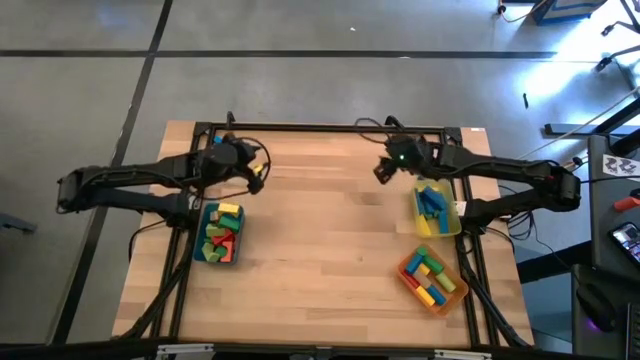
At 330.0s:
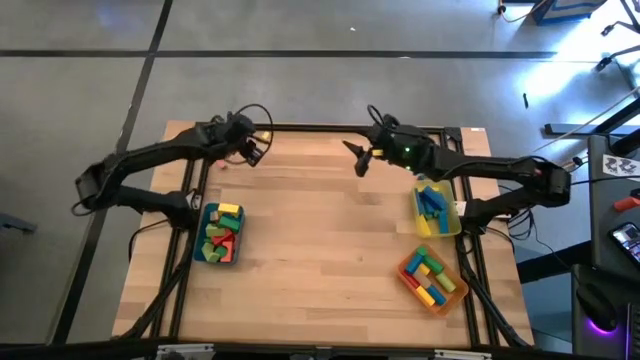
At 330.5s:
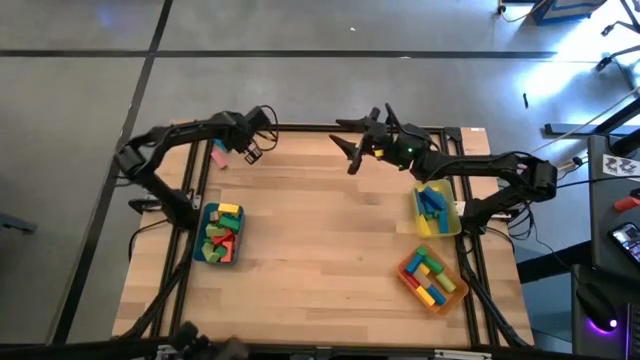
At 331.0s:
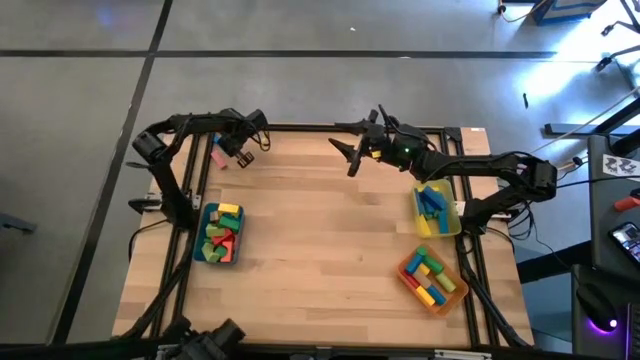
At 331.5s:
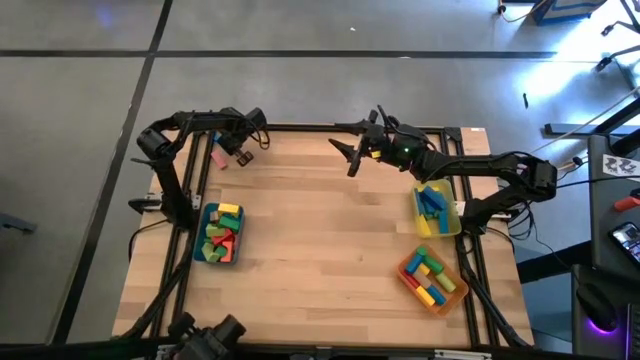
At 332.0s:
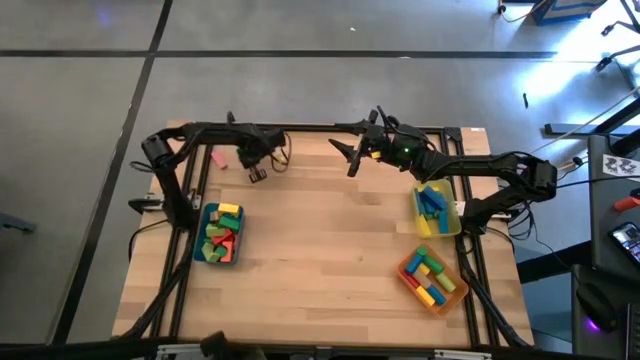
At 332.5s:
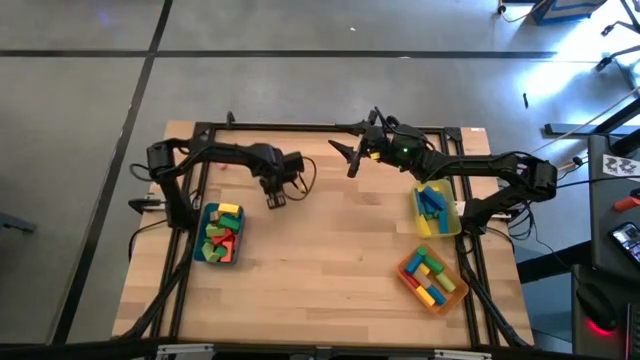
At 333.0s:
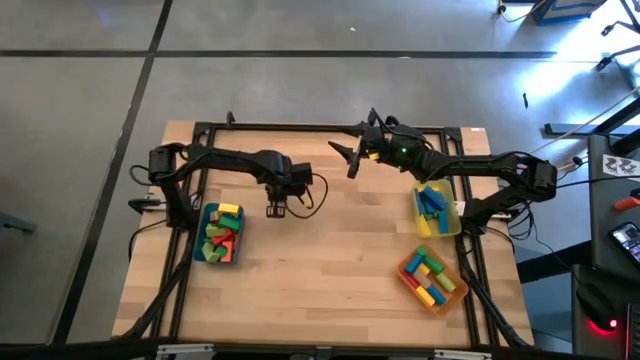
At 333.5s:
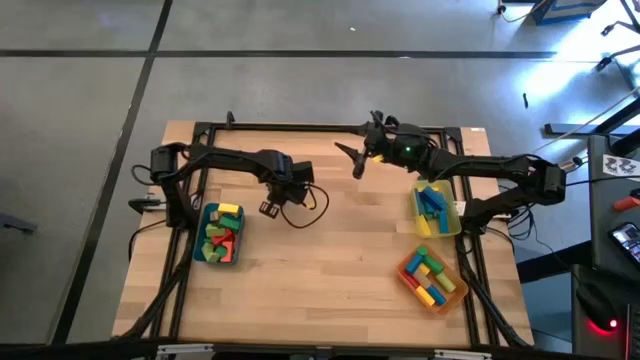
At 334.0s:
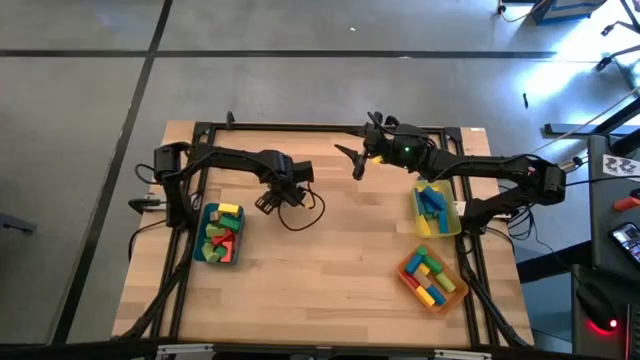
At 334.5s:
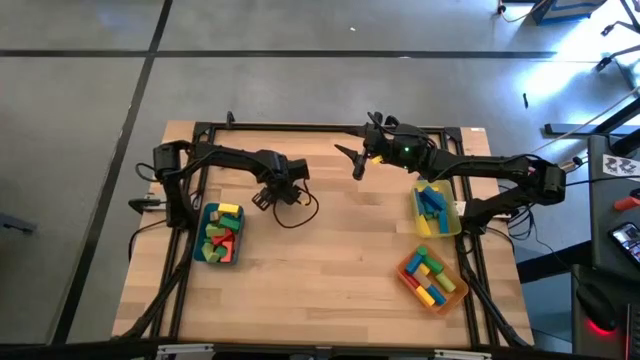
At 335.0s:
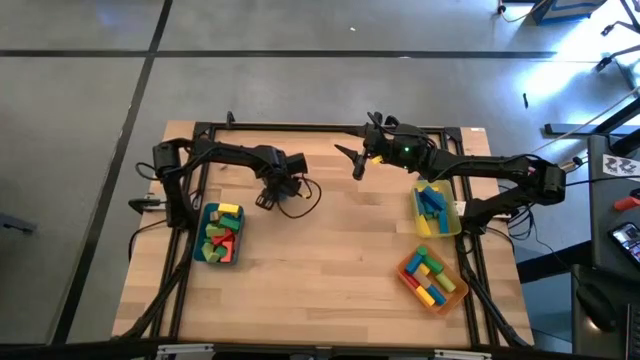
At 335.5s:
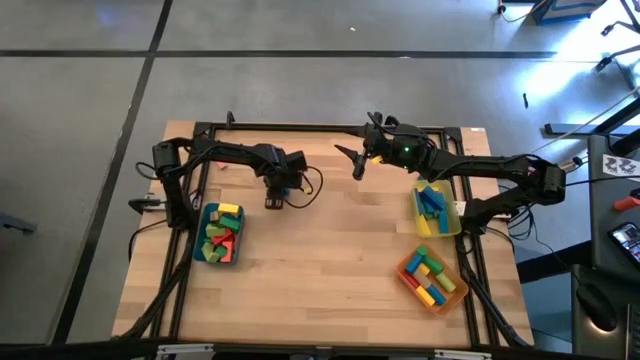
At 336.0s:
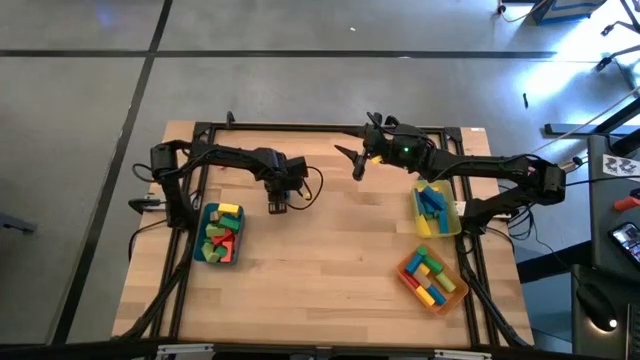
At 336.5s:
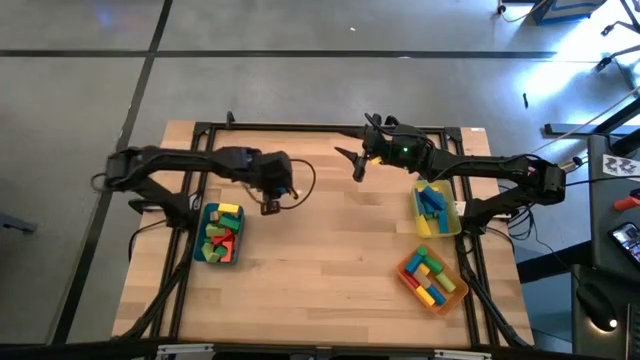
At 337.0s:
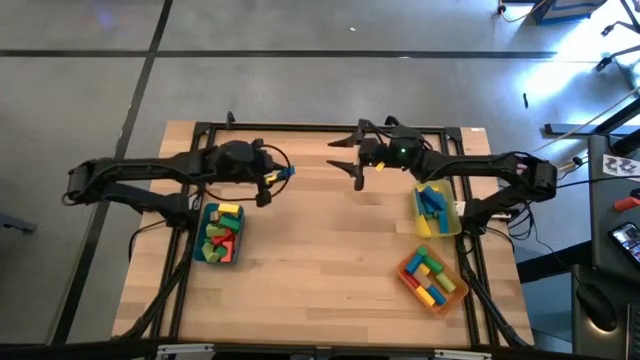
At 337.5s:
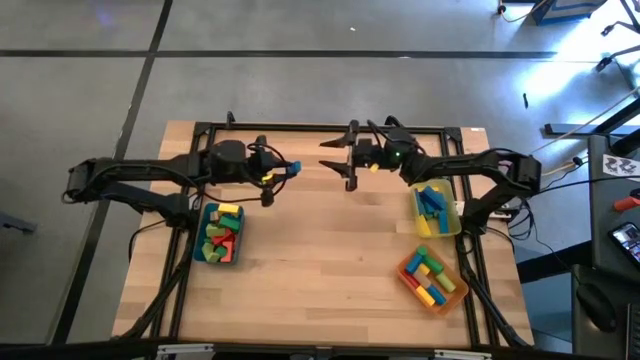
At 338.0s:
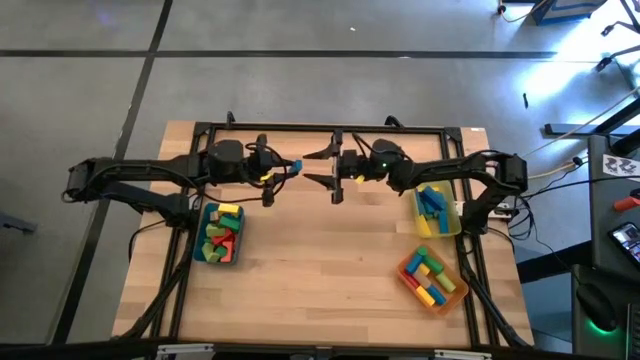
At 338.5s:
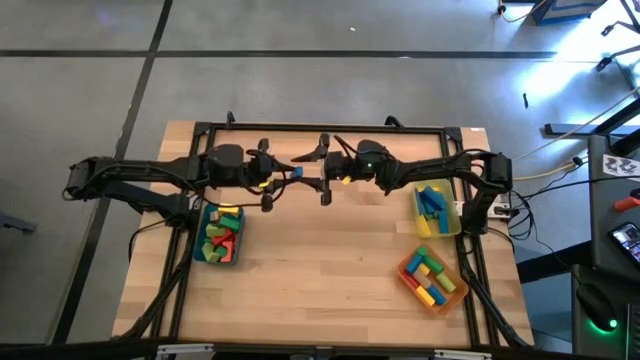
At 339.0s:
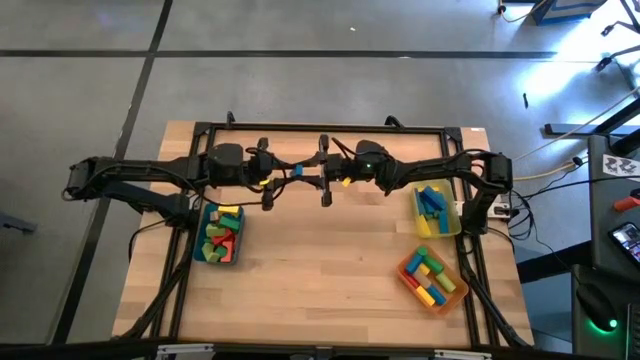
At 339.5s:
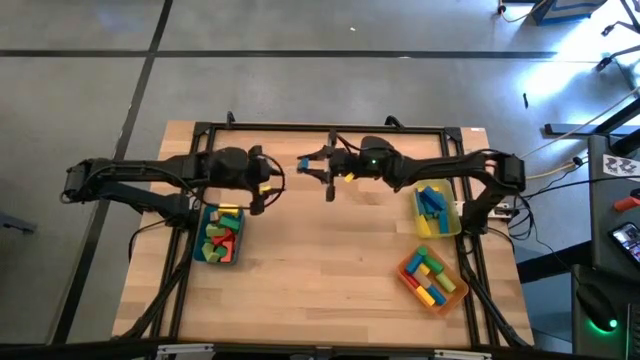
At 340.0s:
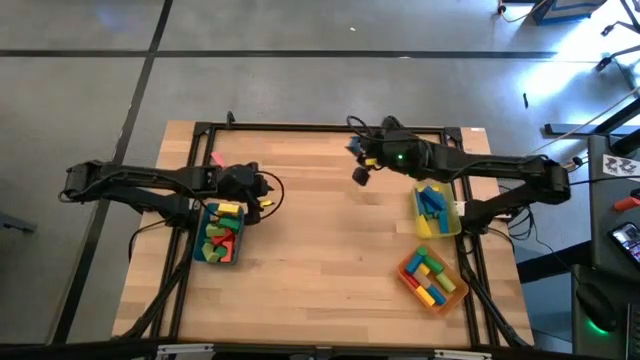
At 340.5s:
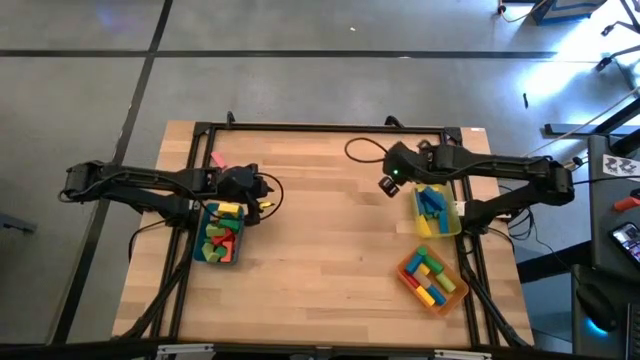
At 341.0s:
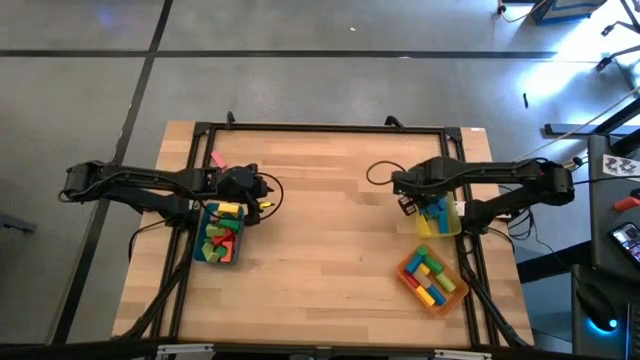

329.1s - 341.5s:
Task: Sort blocks by size
Put the blue rectangular block into the yellow bin

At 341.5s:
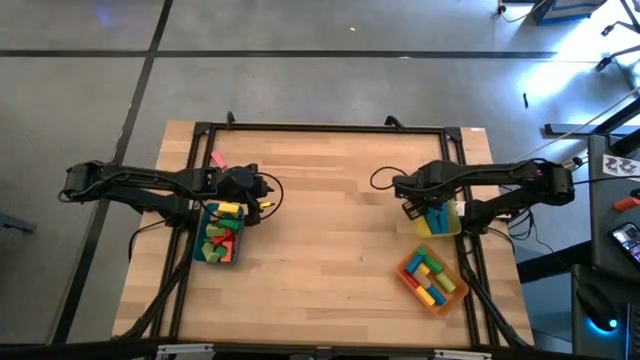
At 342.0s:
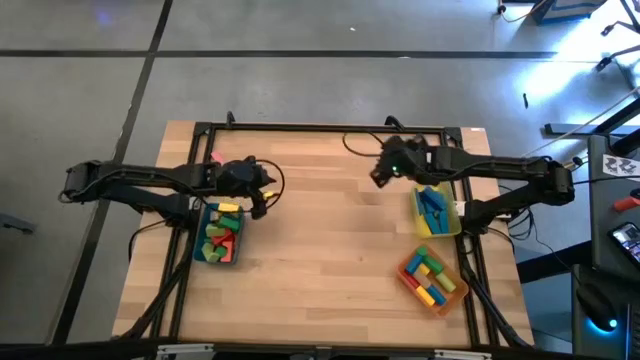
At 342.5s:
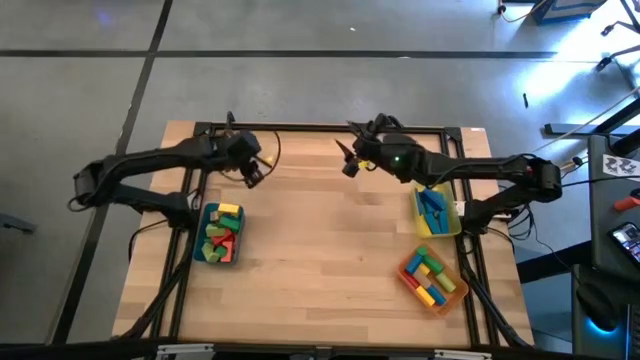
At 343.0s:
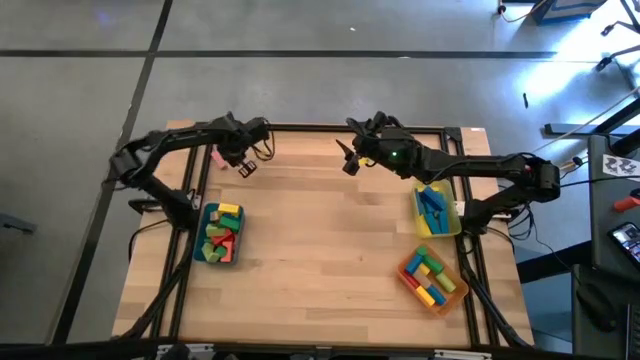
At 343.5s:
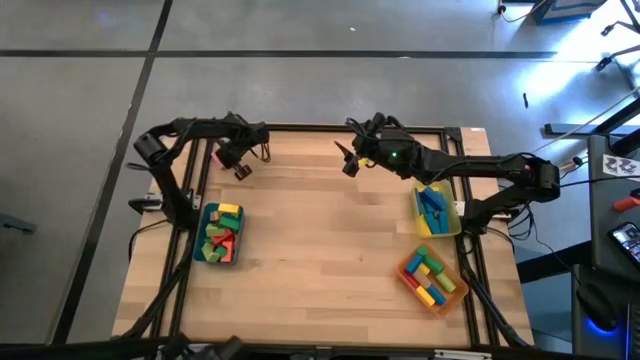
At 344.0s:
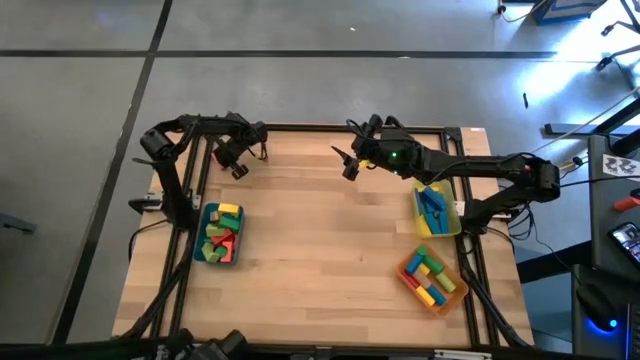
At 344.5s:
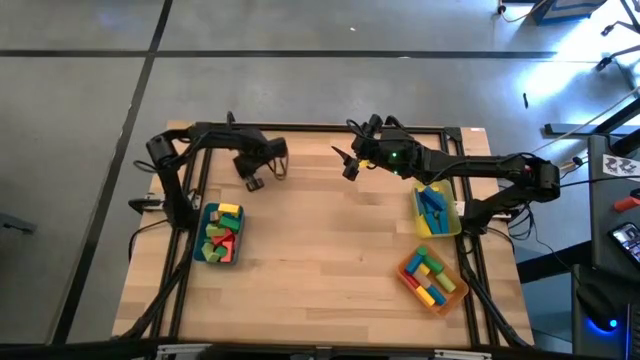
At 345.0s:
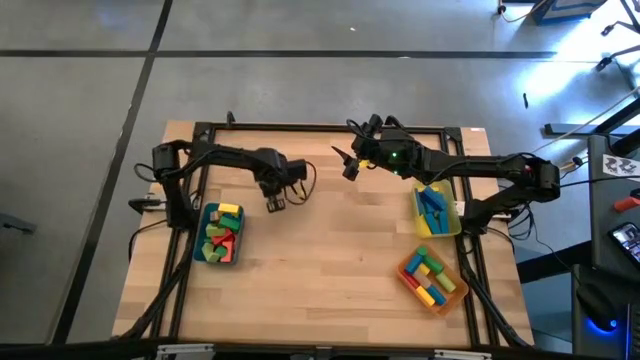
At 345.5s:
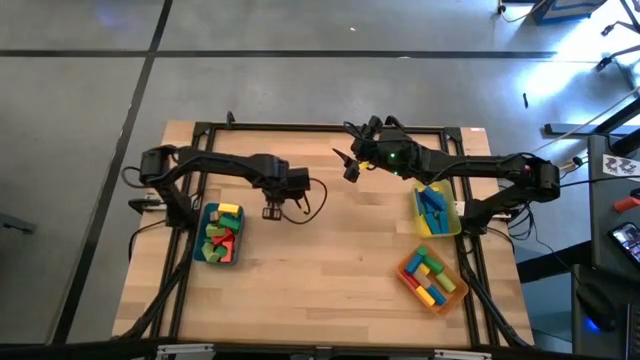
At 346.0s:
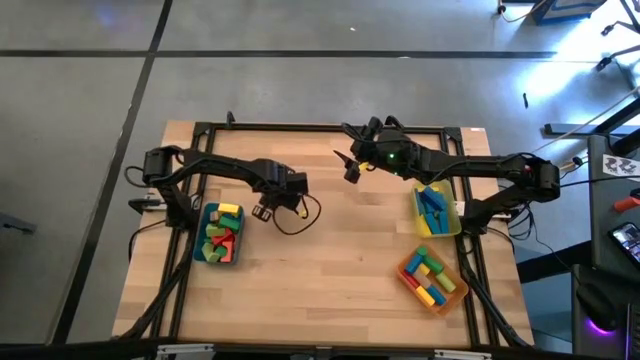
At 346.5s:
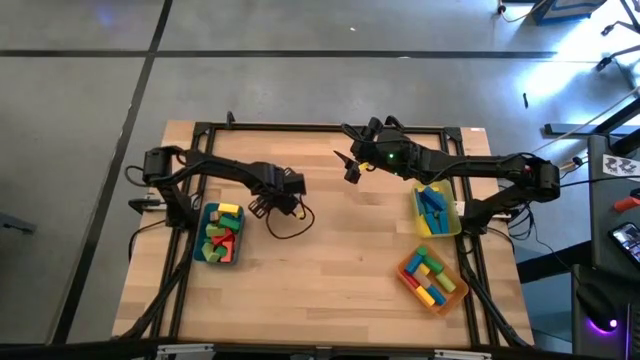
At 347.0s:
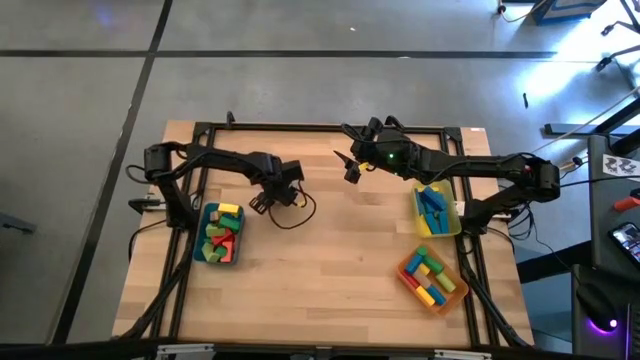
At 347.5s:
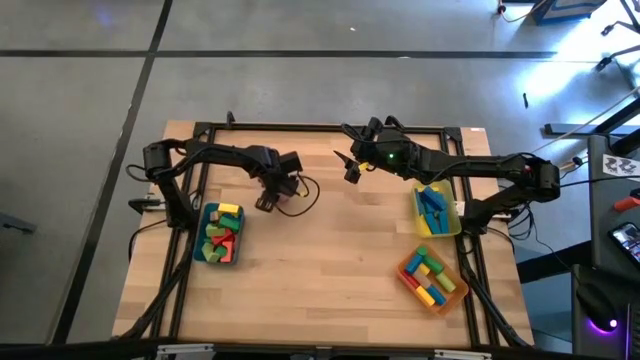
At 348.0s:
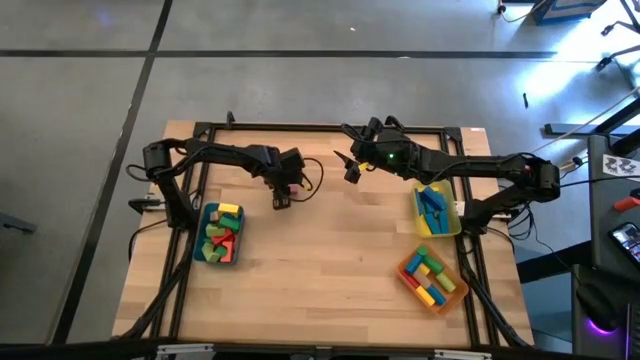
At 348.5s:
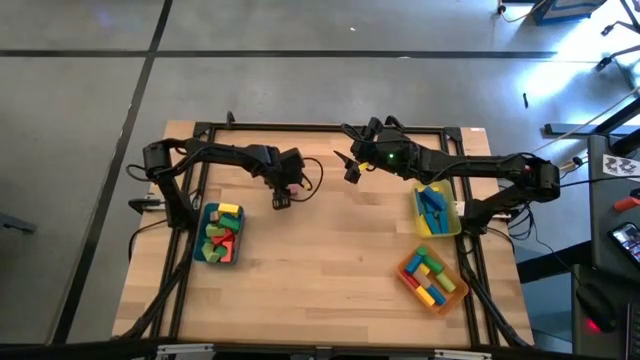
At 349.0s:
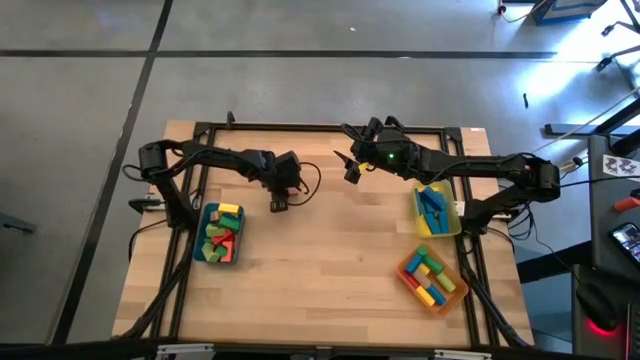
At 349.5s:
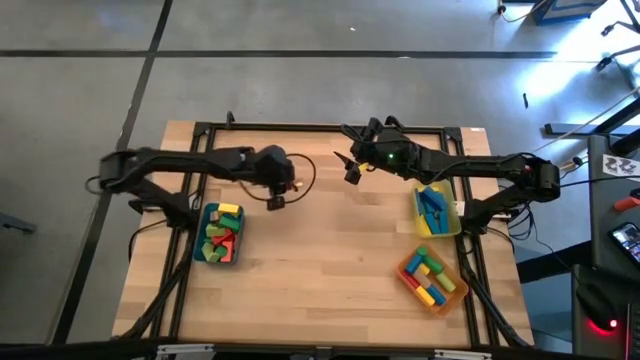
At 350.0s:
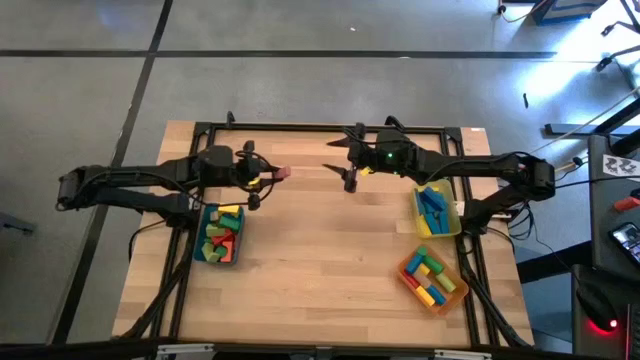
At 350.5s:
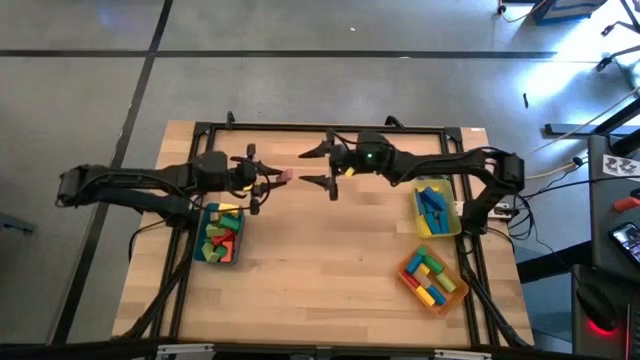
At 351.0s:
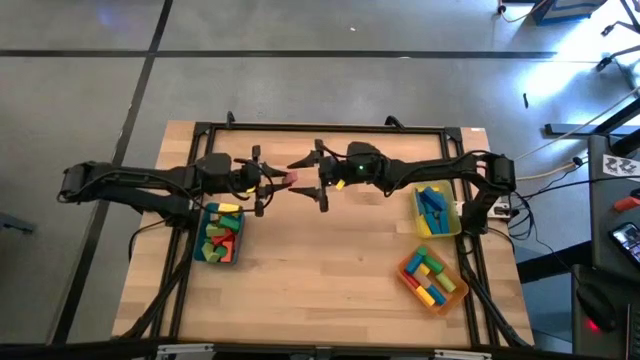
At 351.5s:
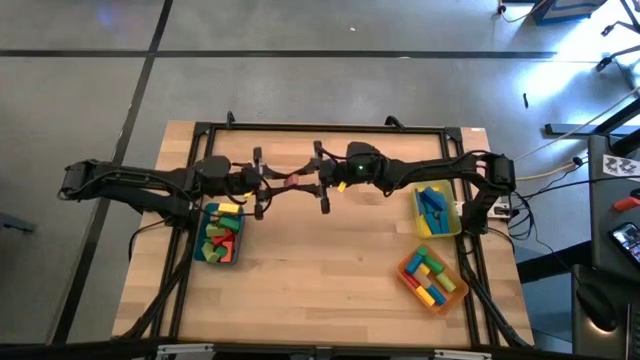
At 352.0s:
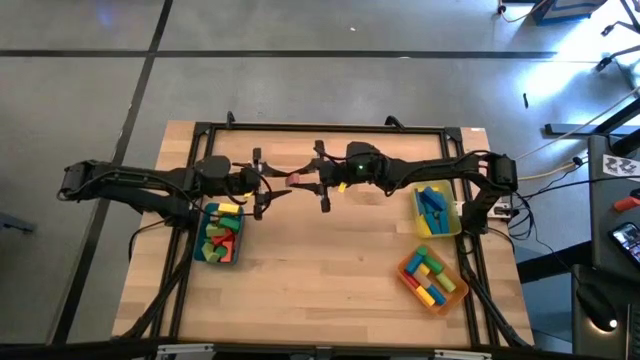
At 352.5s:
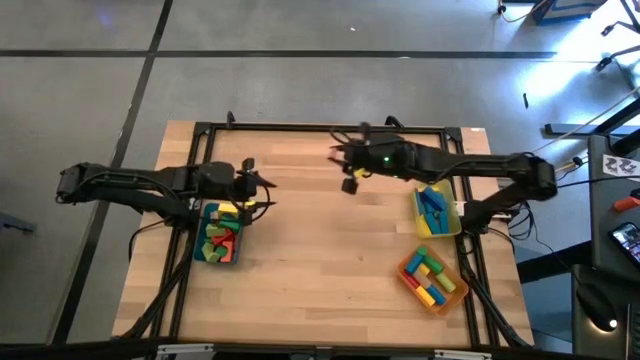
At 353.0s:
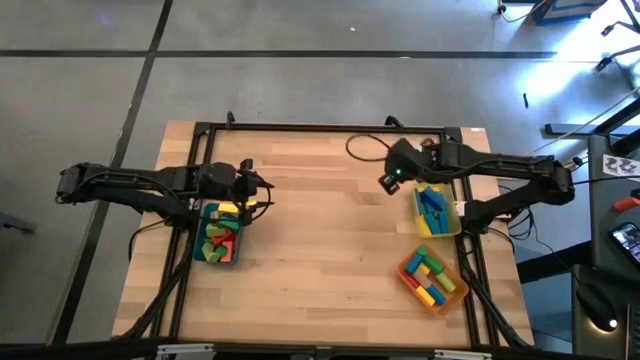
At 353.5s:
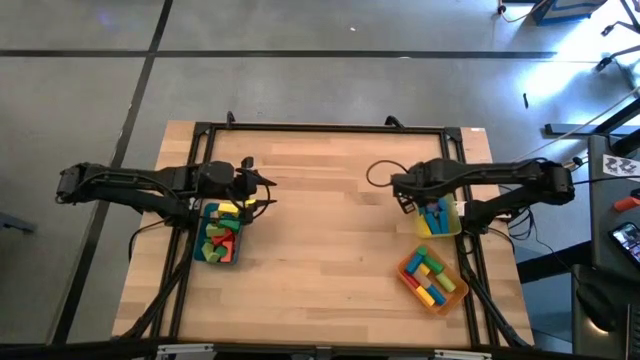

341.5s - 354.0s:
Put the pink rectangular block into the yellow bin
